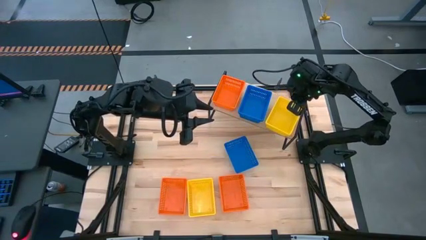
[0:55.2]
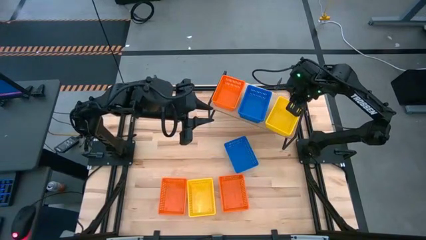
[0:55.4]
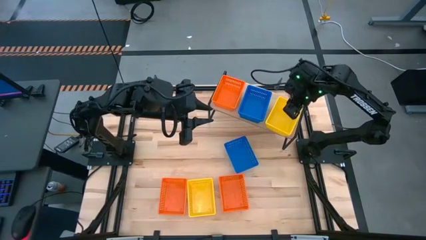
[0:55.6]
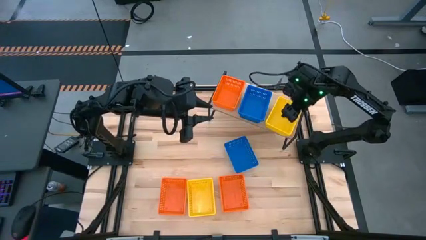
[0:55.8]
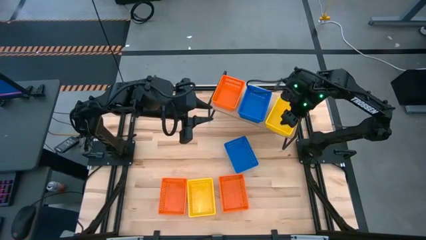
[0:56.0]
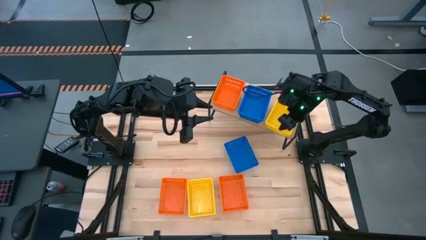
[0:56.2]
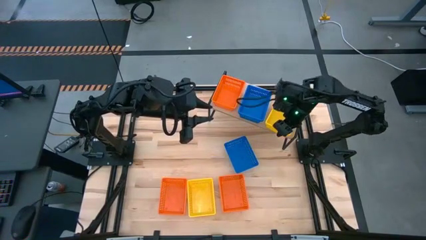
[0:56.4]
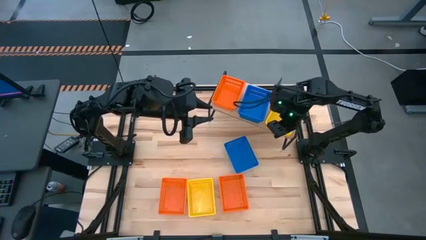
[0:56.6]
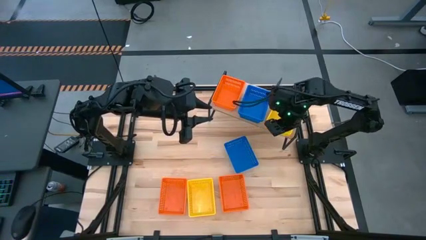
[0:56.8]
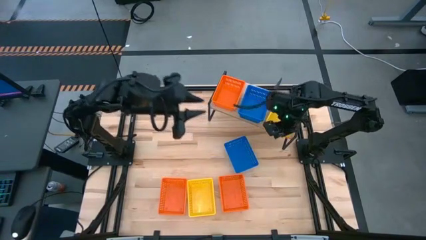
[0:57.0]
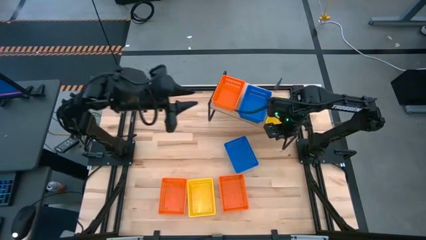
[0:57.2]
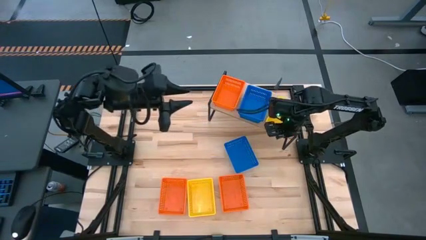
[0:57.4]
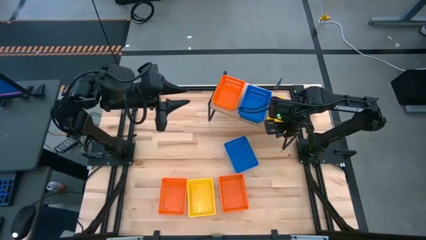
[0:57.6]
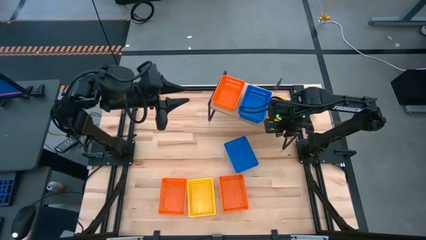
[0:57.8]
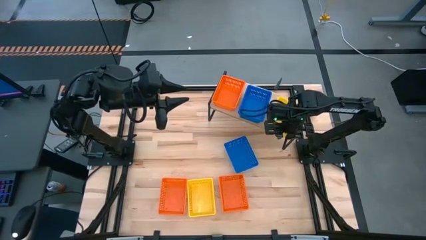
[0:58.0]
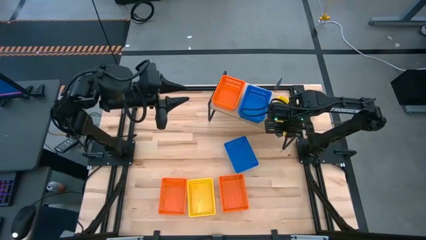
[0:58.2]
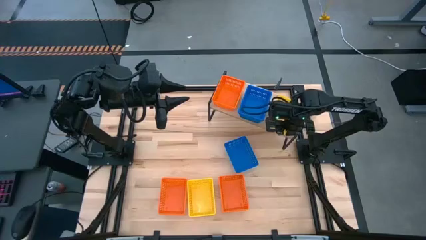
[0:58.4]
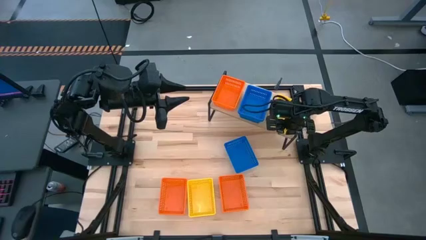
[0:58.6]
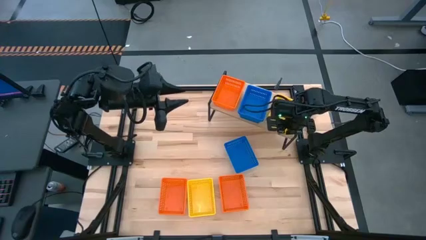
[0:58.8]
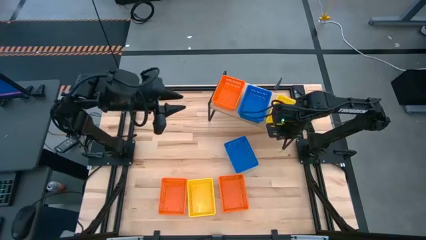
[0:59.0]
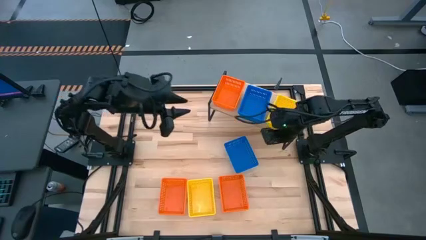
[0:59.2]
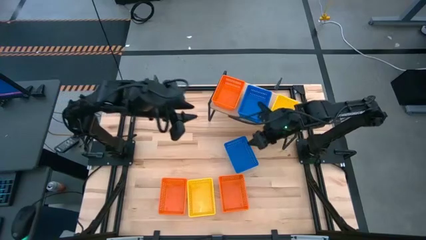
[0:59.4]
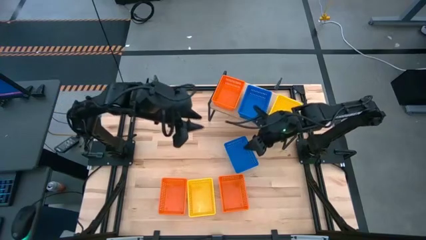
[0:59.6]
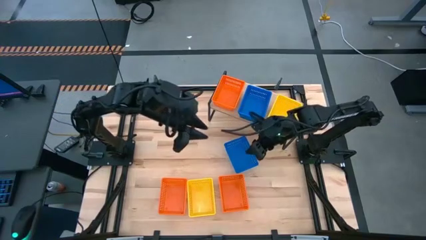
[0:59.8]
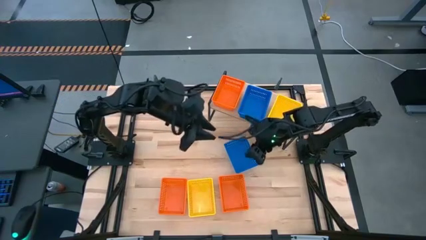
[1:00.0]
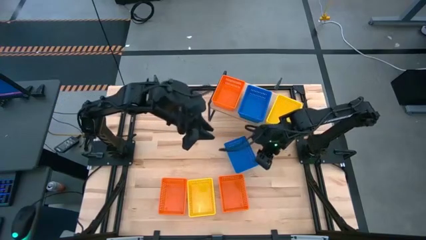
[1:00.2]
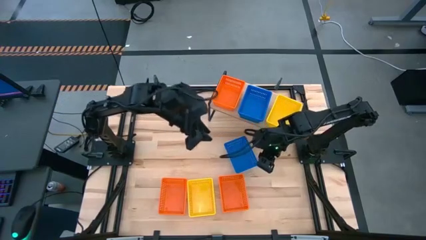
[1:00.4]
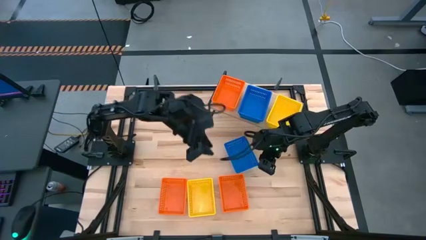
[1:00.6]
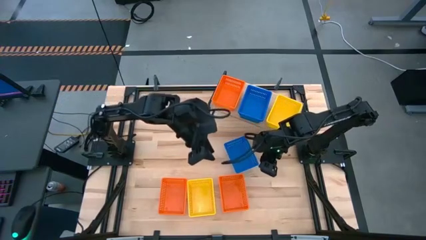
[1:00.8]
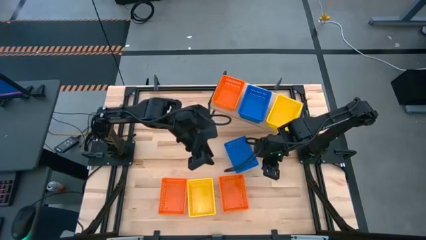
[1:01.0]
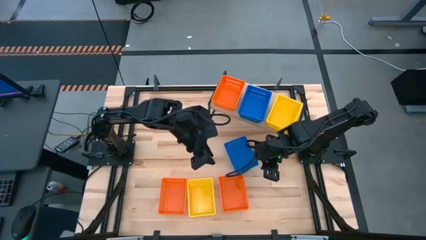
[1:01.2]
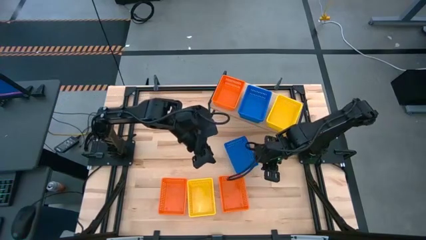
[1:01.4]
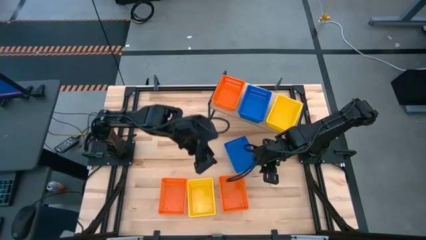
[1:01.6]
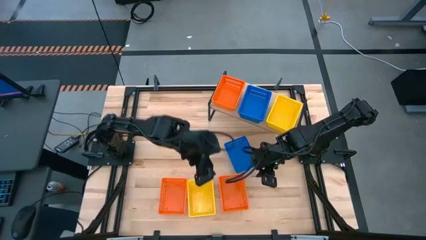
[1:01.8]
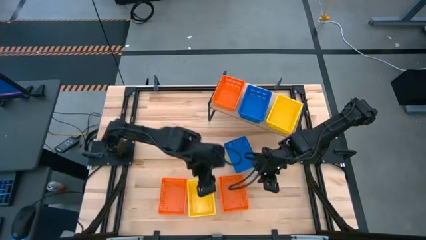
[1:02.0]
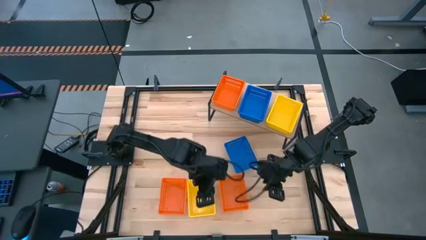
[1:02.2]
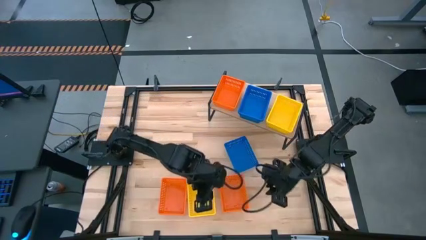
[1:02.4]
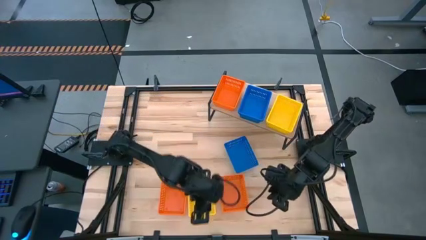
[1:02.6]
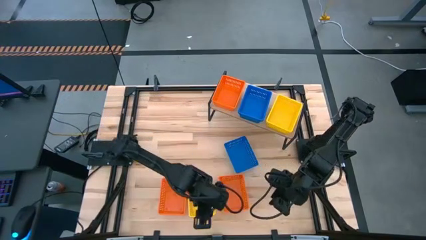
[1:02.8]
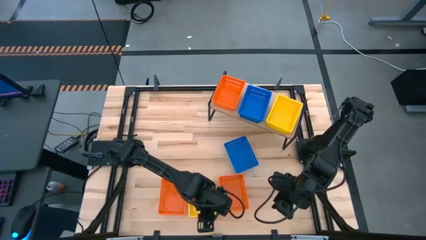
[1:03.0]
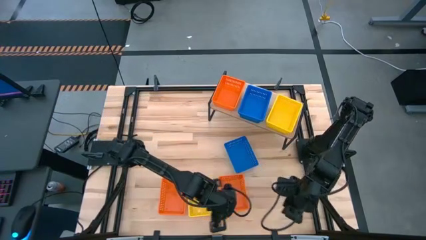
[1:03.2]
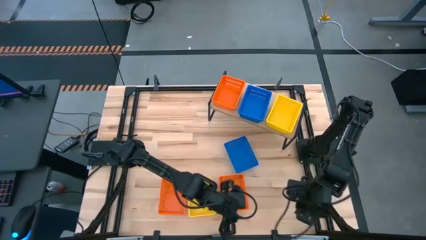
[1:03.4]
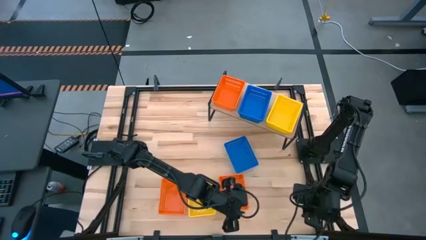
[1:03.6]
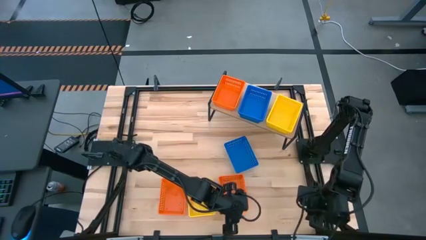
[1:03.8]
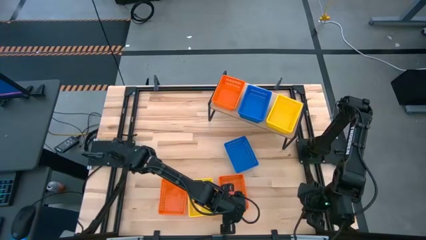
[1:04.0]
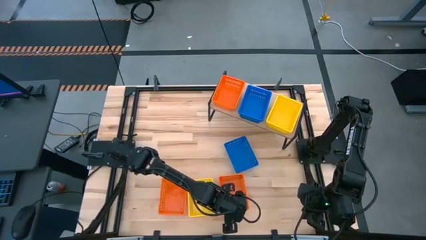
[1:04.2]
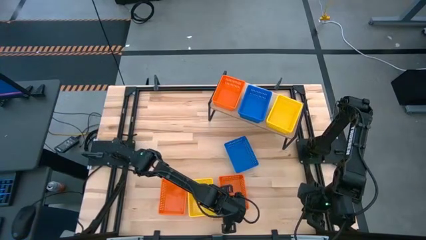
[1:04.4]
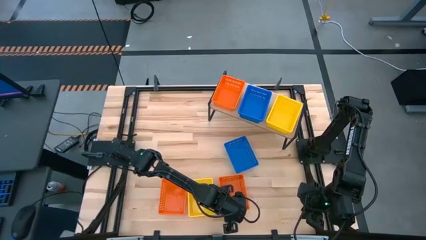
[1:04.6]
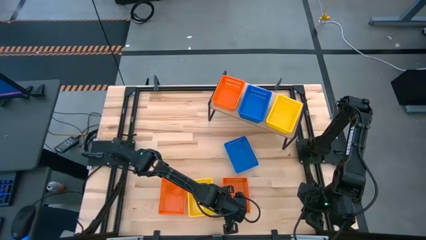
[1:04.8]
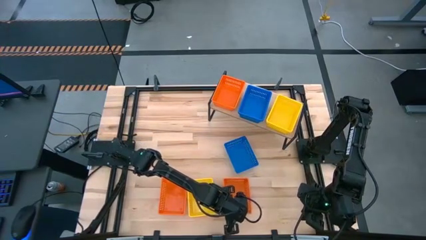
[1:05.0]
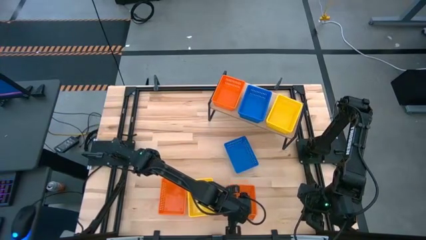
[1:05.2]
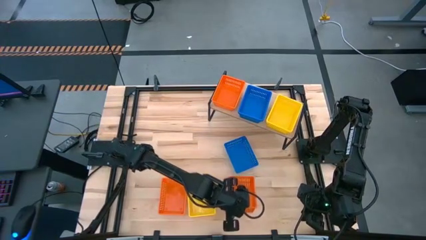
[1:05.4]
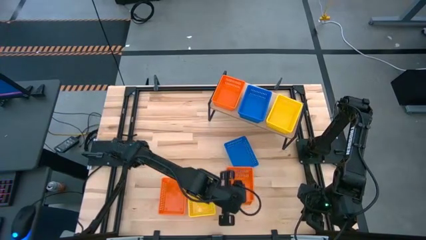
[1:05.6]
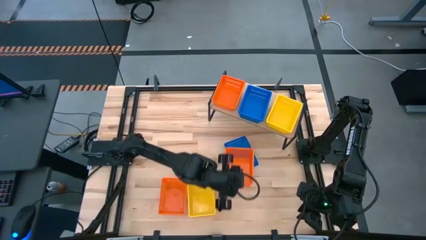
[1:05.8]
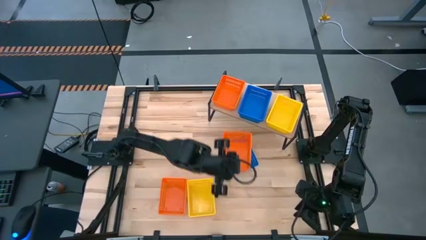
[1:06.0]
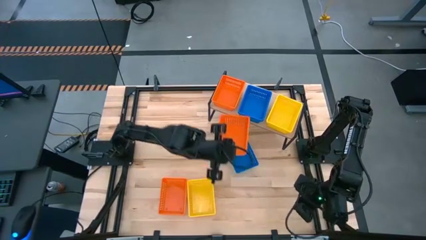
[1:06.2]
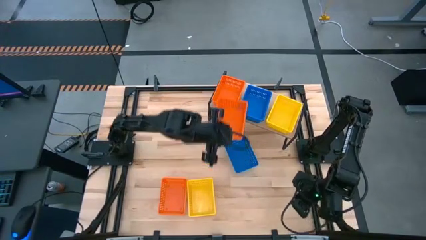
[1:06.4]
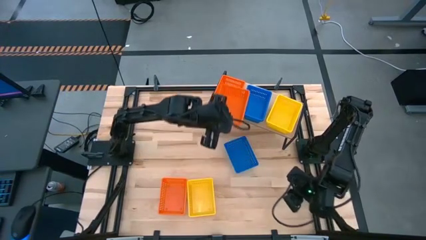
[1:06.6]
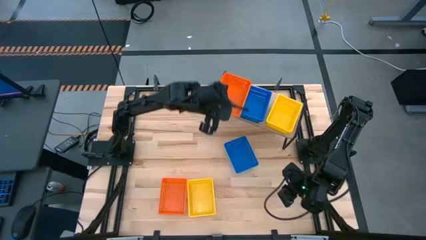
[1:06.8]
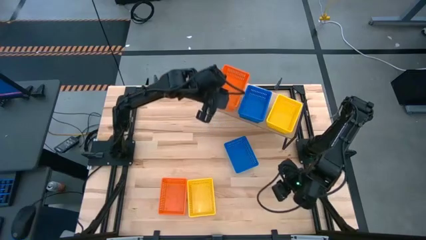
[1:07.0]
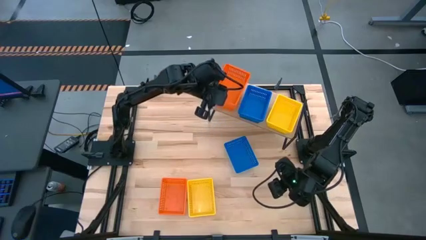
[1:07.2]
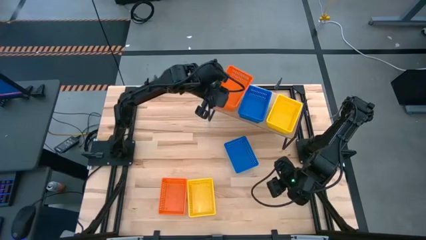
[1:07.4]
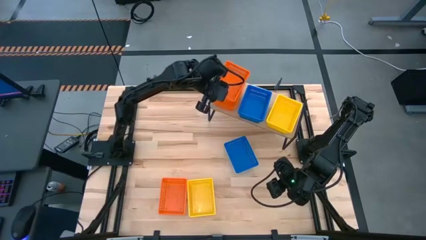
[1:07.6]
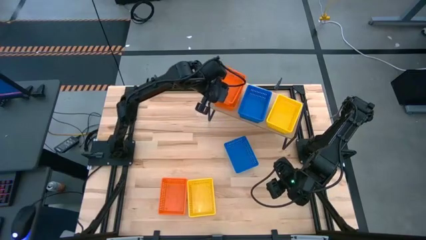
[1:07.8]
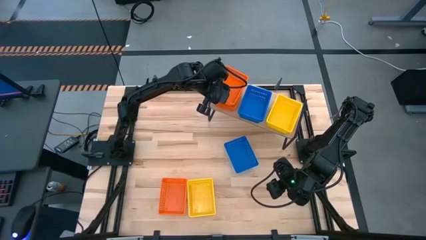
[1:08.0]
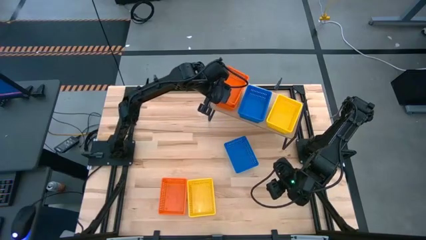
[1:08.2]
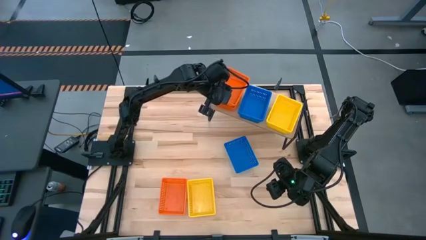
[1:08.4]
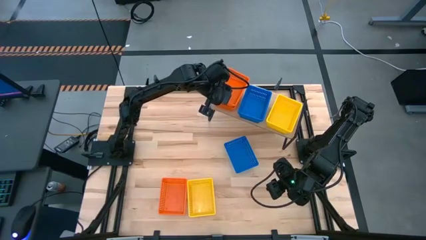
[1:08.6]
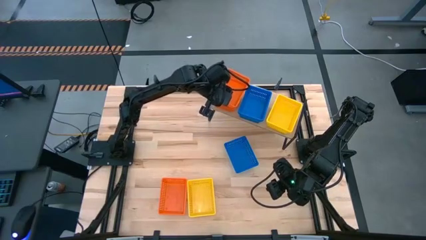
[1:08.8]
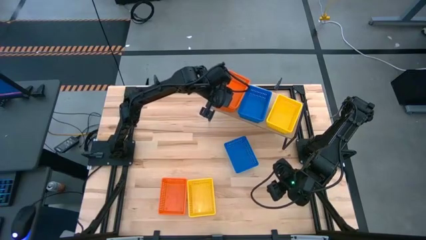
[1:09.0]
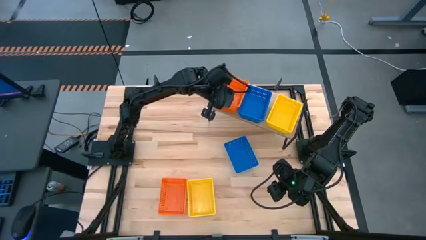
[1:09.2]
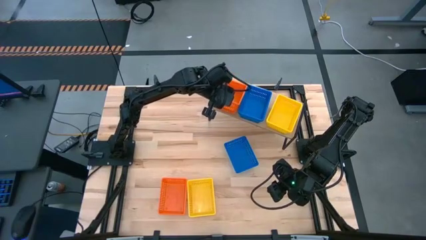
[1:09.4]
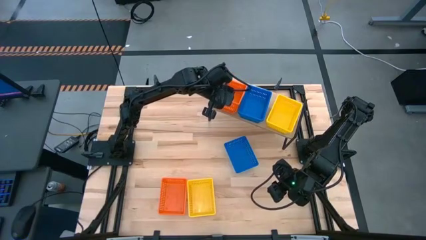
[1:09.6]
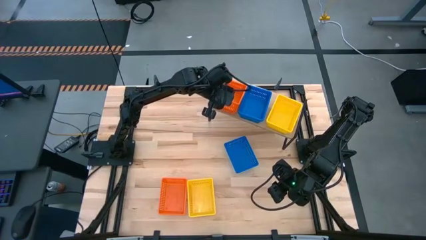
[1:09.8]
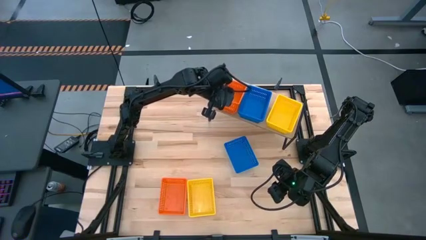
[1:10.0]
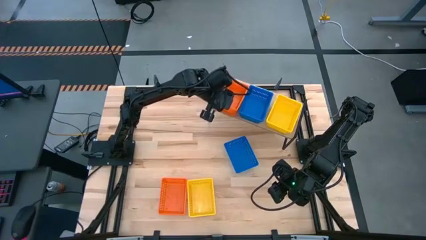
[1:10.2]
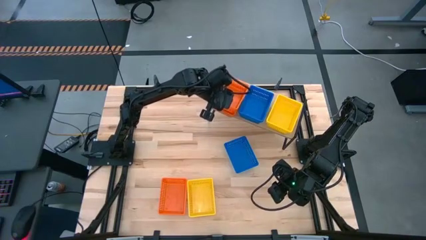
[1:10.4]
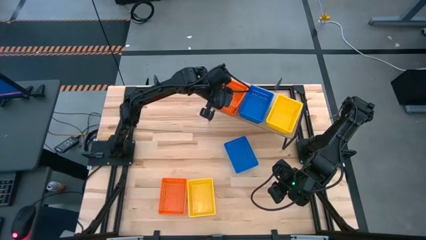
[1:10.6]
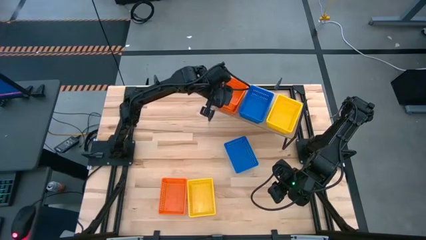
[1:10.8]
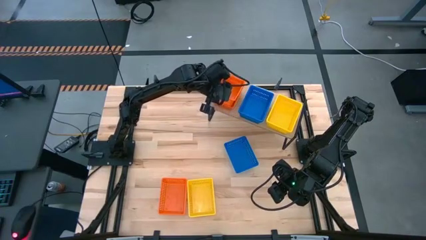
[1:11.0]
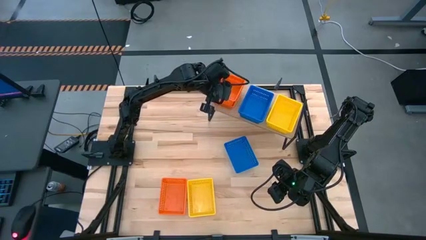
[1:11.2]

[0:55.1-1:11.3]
Task: Stack baskets on shelf by color
Stack the right orange basket on the orange basket on the shelf
